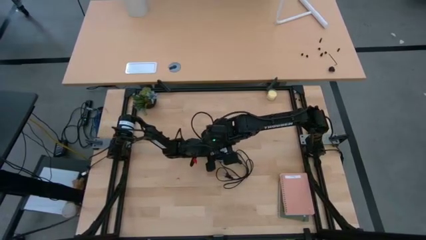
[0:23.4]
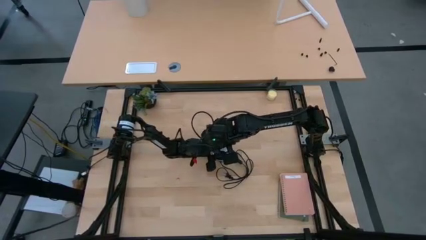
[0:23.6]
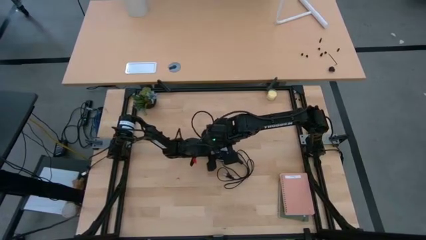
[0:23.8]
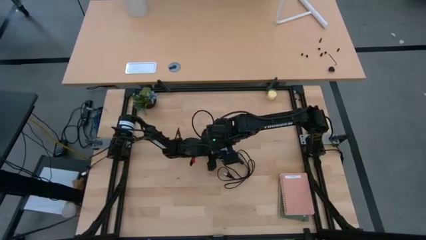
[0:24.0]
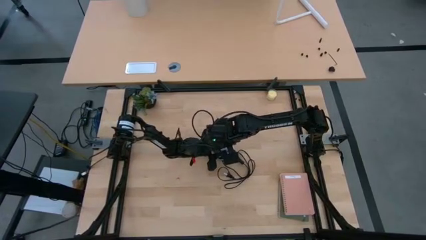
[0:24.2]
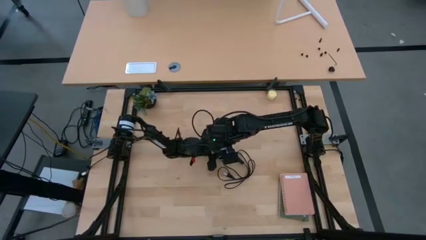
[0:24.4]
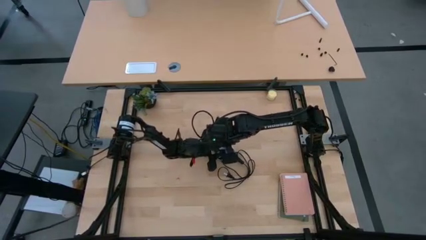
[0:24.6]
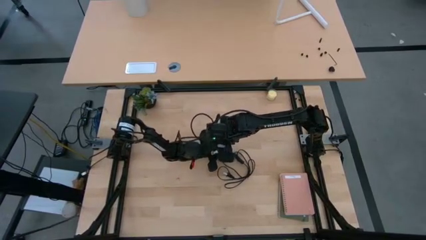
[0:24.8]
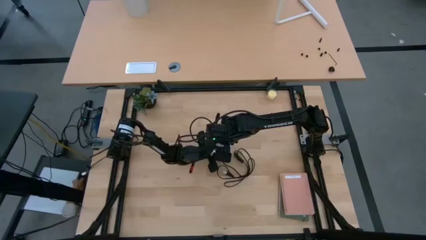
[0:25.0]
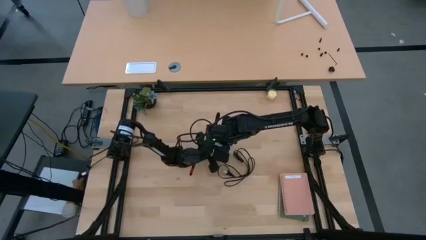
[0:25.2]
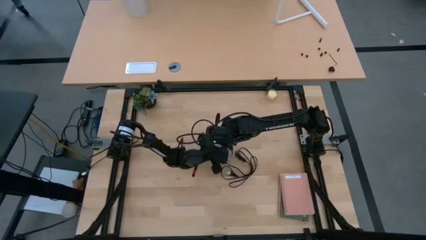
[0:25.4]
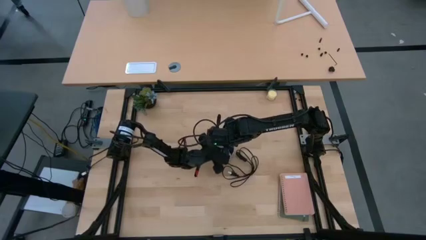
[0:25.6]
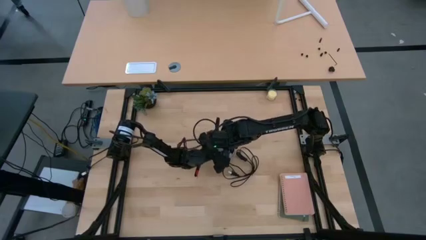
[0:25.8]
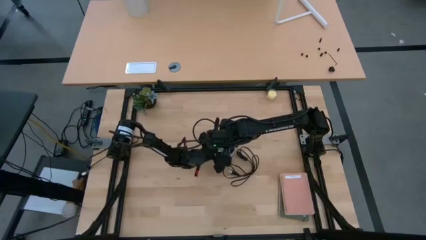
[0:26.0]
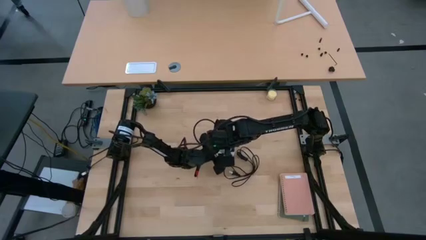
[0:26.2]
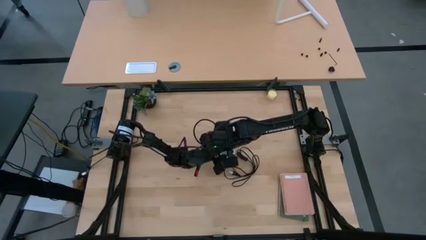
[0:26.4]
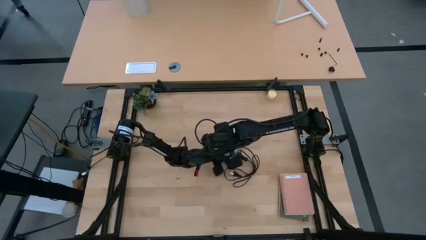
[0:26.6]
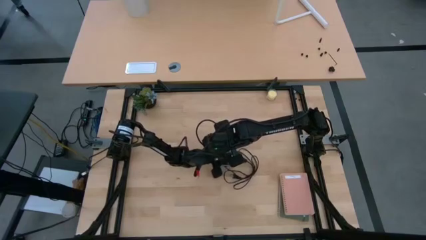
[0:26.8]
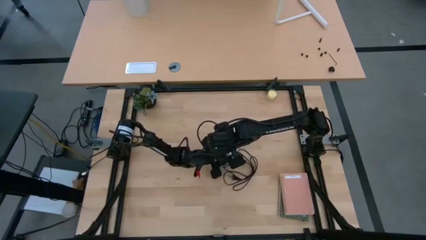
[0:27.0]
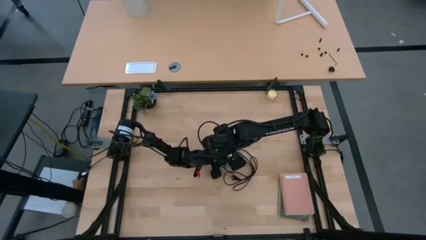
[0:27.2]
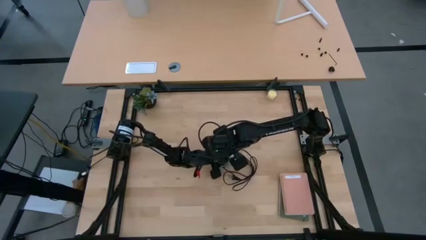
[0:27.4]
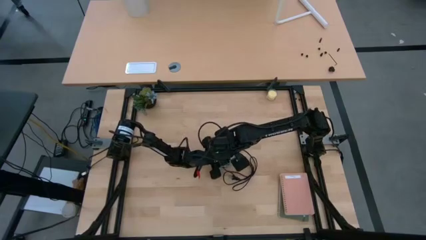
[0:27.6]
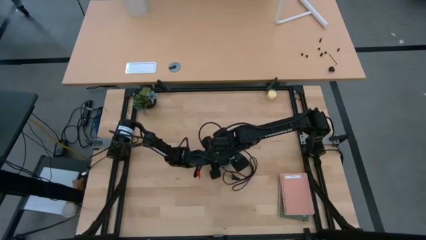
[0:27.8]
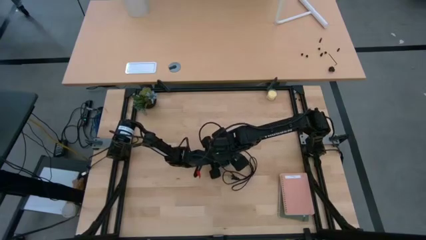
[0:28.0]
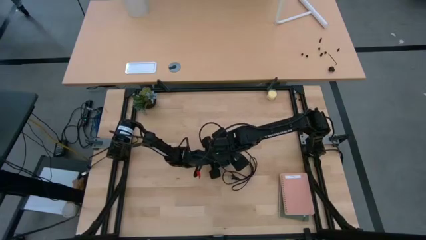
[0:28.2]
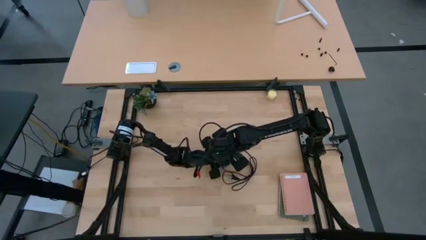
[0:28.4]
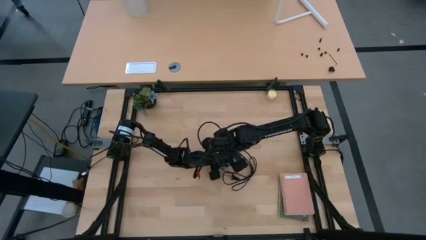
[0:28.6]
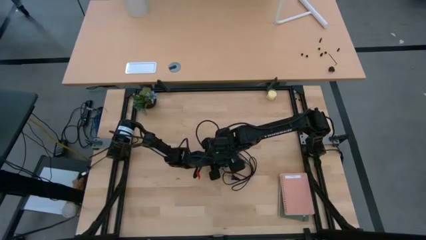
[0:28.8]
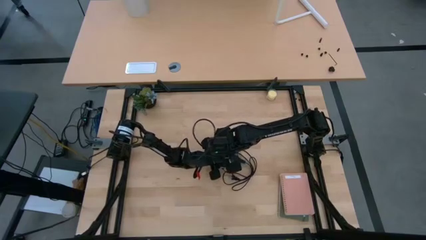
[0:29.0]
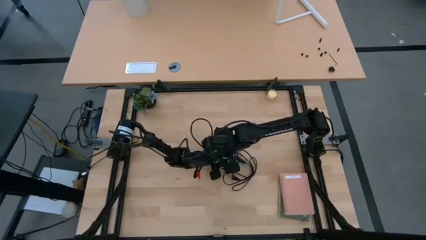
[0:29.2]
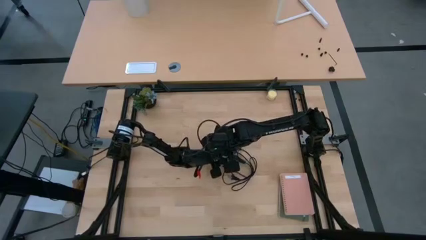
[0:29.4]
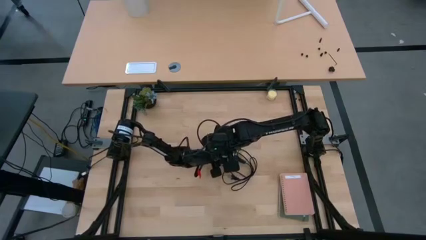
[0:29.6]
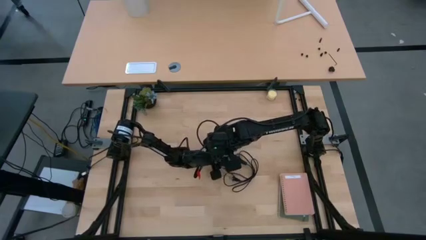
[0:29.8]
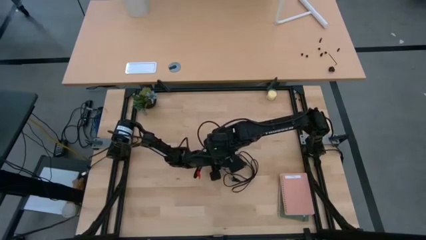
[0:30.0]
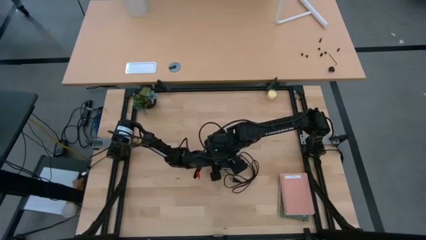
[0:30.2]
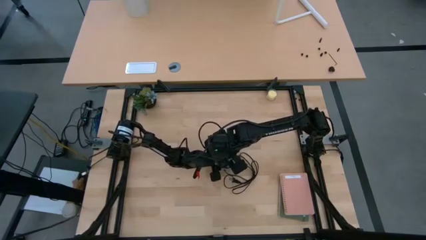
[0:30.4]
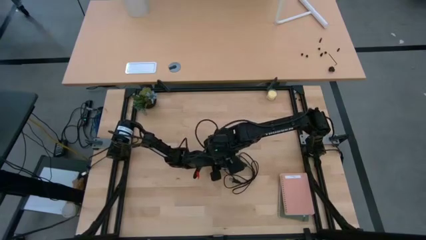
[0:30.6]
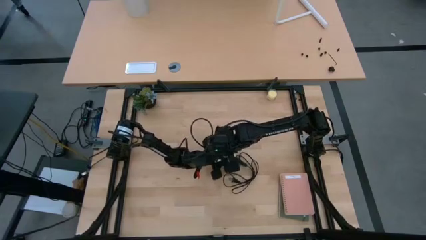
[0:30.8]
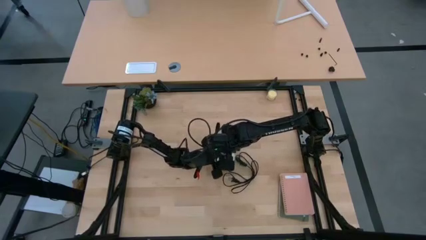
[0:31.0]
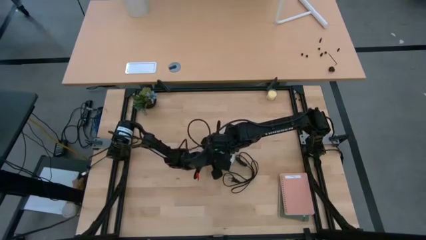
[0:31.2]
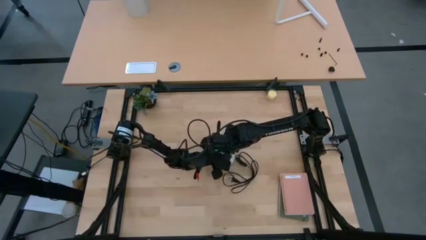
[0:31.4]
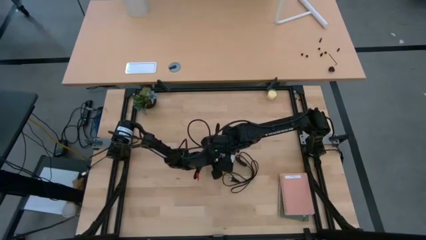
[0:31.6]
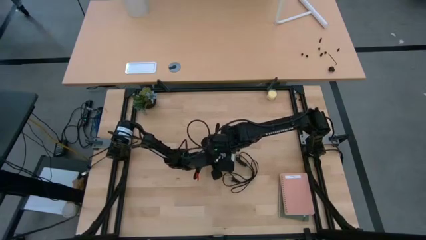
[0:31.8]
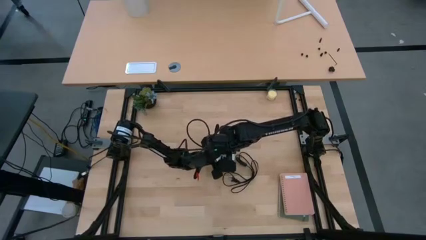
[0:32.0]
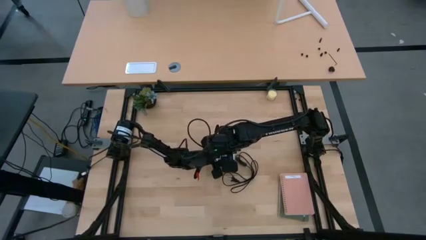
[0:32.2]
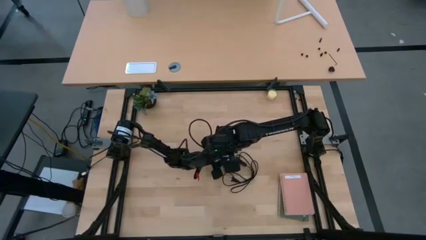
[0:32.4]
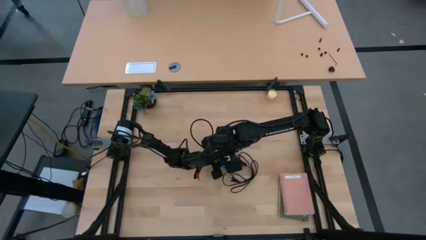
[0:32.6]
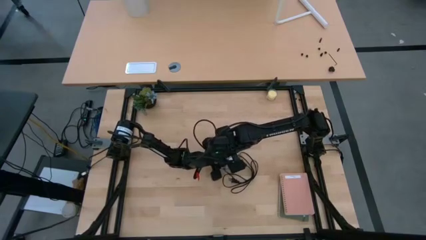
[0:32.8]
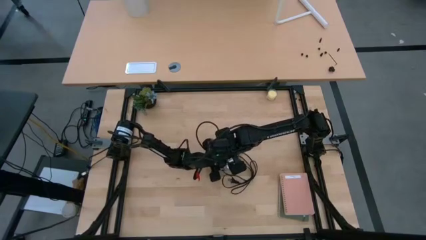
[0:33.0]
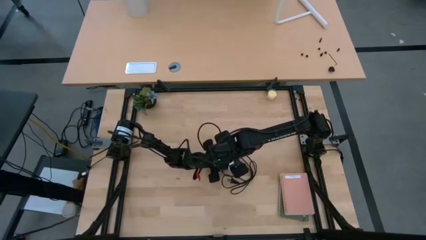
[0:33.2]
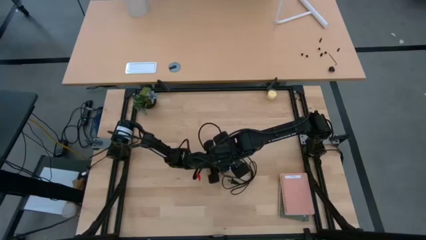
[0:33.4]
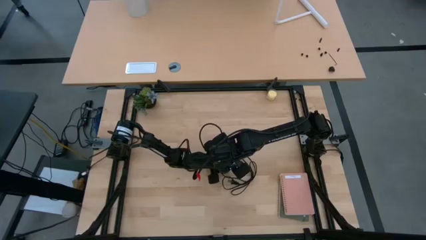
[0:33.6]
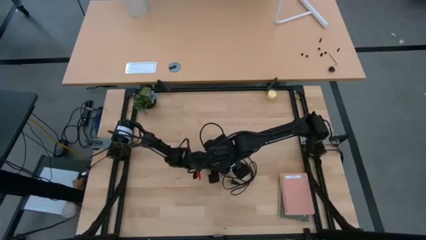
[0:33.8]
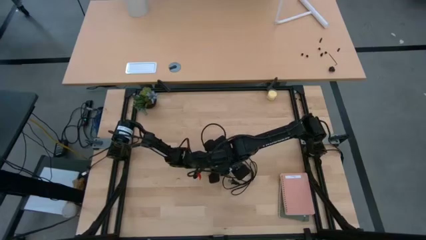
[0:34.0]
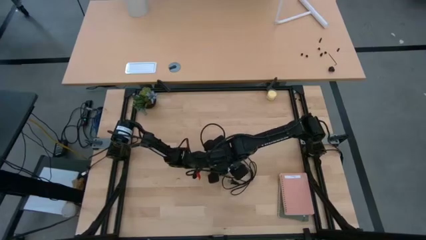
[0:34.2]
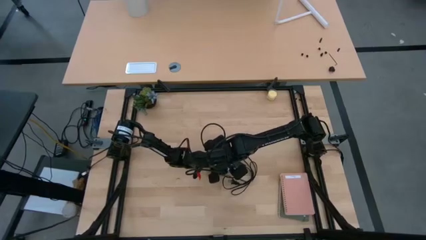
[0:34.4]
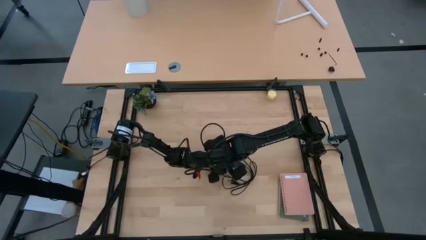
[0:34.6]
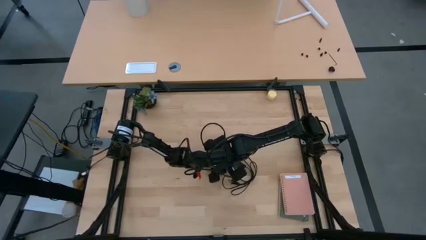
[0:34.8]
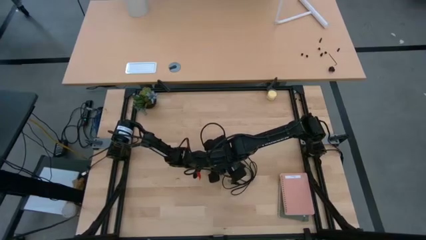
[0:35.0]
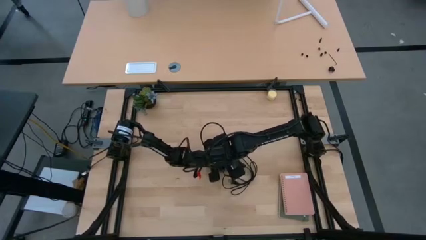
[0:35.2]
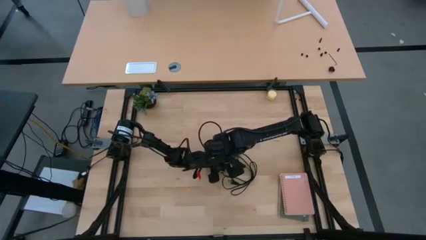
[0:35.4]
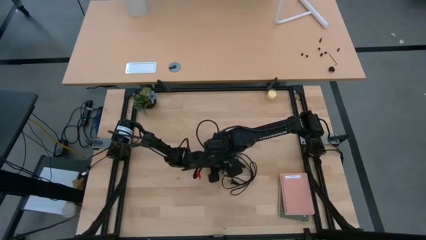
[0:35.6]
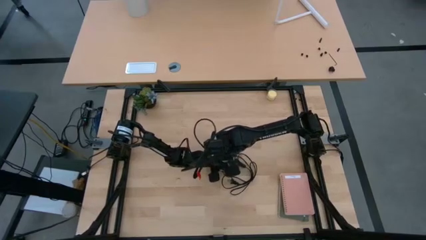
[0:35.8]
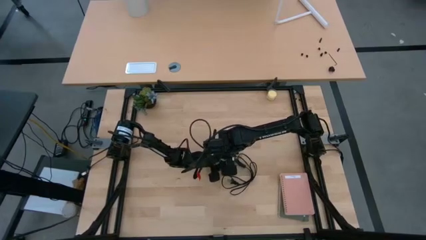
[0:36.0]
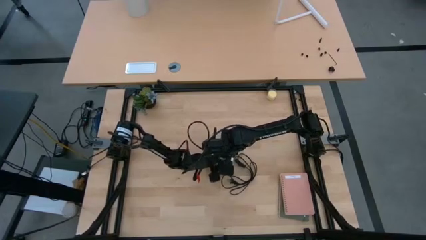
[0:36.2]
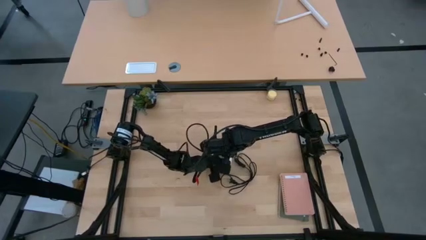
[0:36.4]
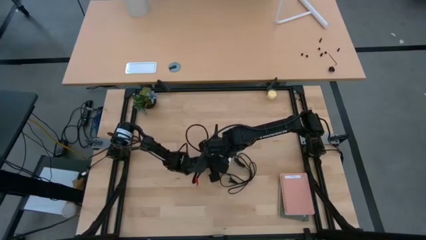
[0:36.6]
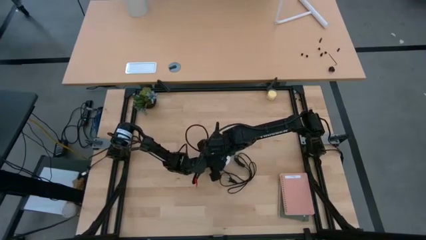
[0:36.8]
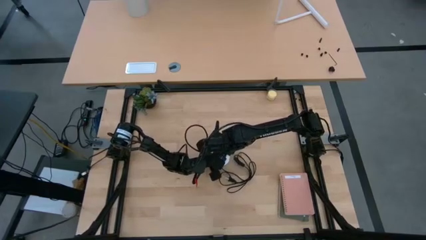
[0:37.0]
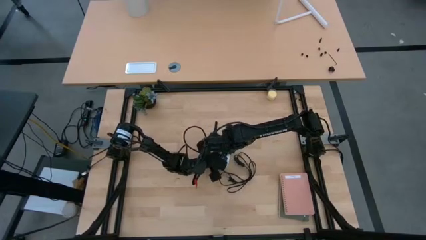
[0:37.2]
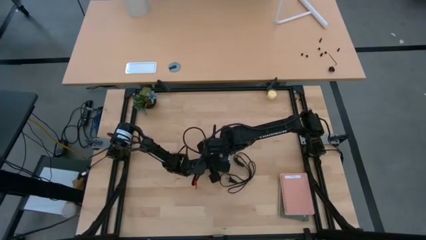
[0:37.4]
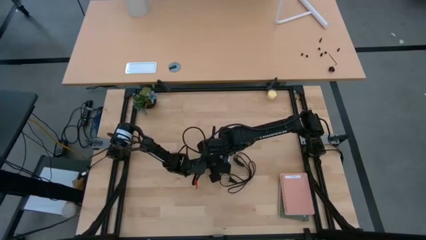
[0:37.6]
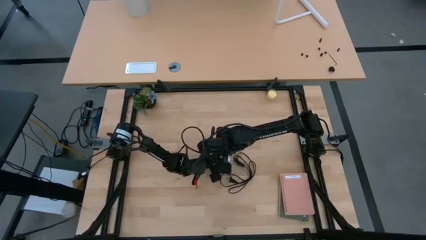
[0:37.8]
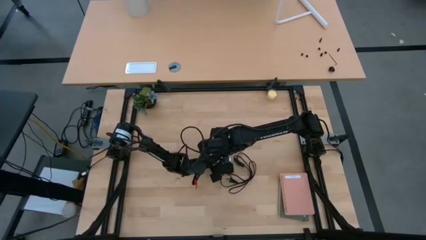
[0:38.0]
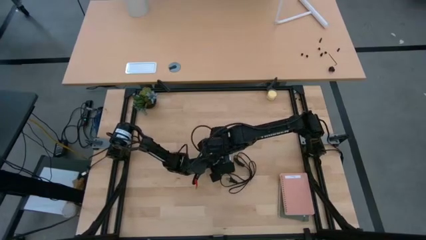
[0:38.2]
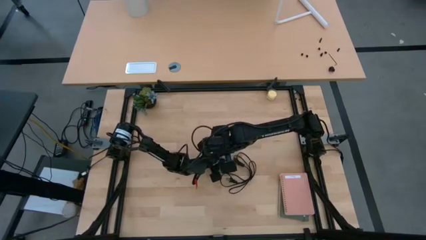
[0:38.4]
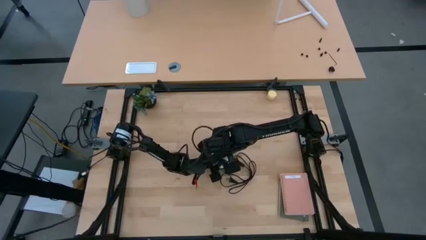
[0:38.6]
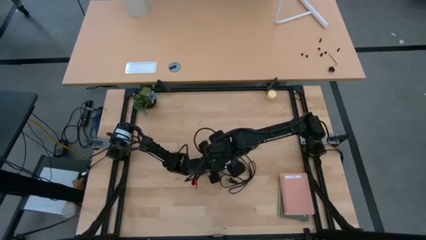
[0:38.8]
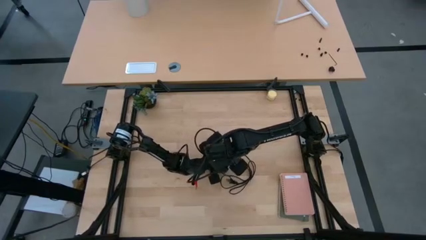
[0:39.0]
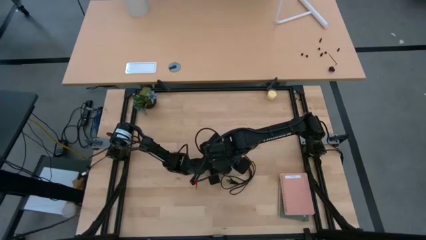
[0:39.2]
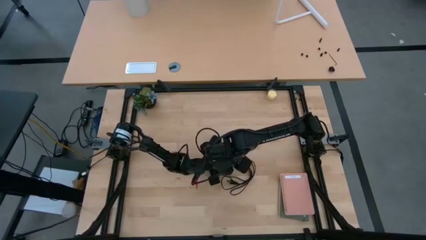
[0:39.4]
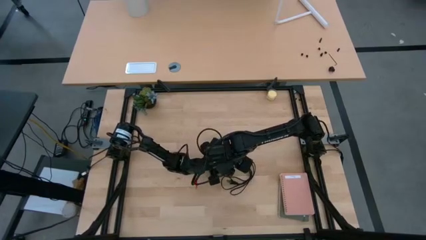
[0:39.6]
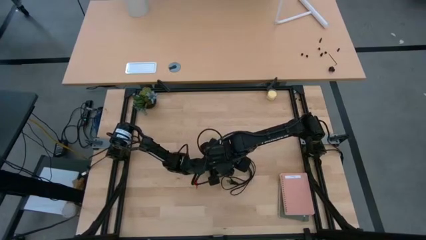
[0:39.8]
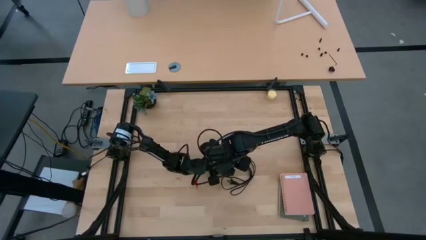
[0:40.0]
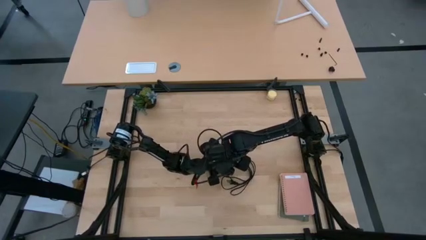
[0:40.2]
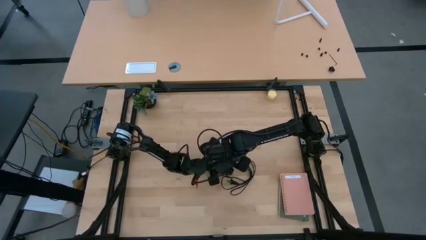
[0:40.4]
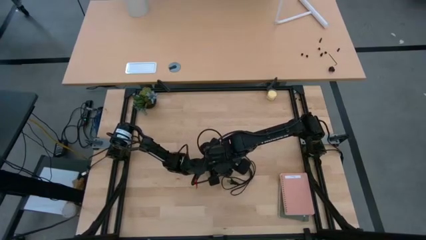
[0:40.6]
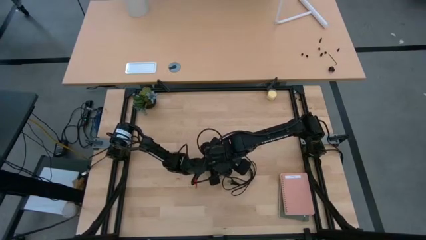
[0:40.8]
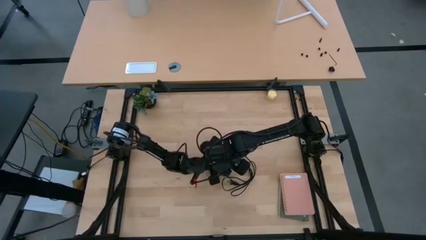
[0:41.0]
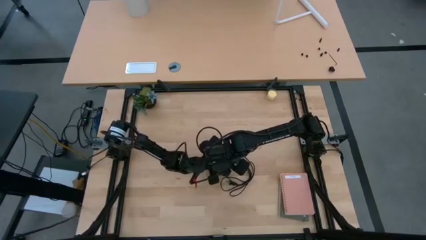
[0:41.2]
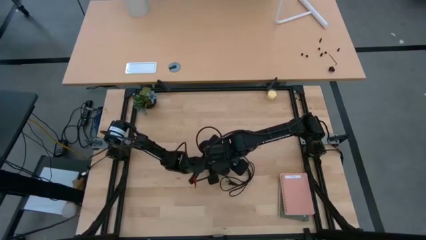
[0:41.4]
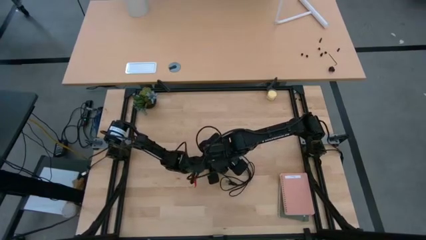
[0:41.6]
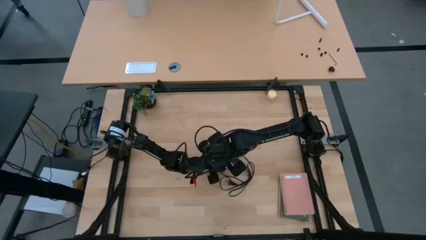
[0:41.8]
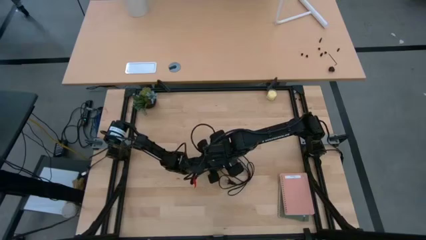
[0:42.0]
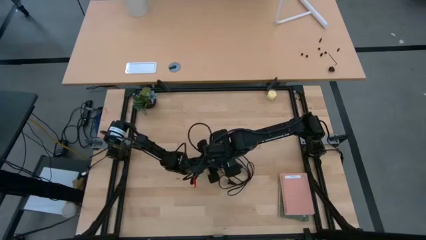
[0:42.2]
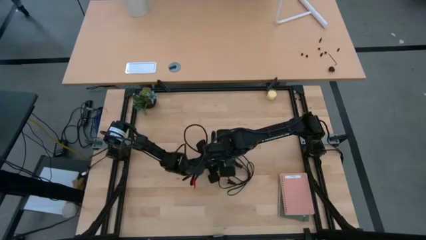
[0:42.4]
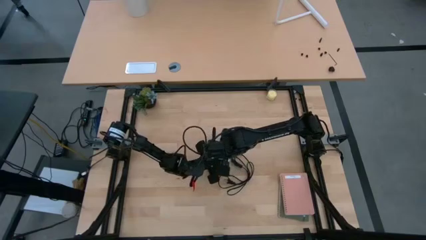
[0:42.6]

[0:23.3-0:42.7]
Task: Screw lightbulb
Insert the light bulb into the lamp
